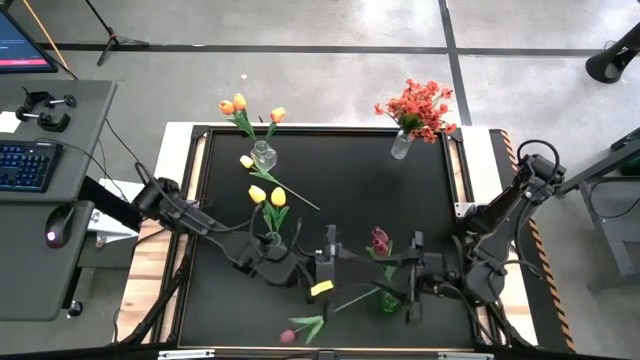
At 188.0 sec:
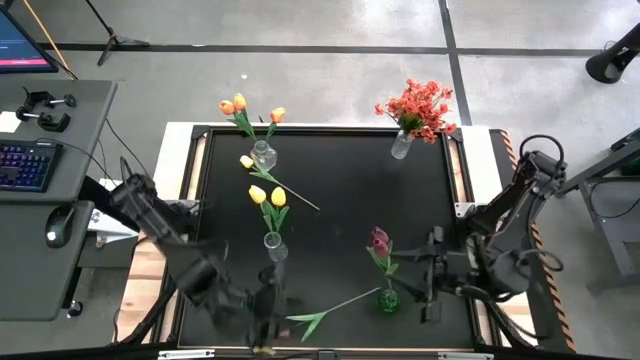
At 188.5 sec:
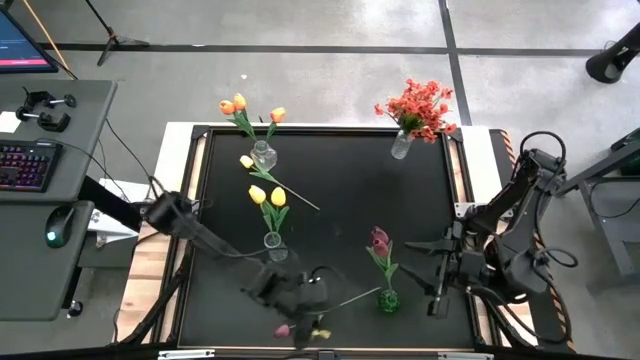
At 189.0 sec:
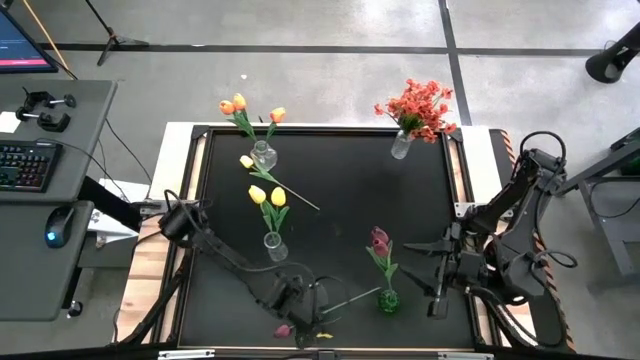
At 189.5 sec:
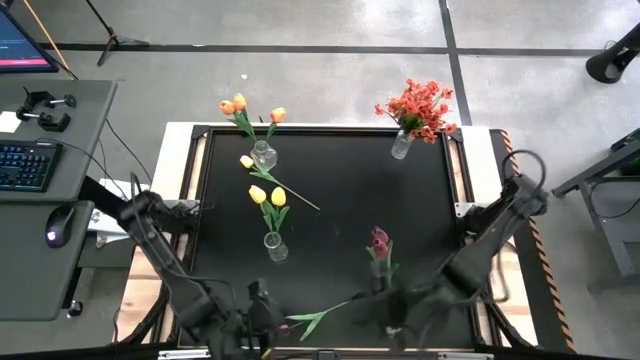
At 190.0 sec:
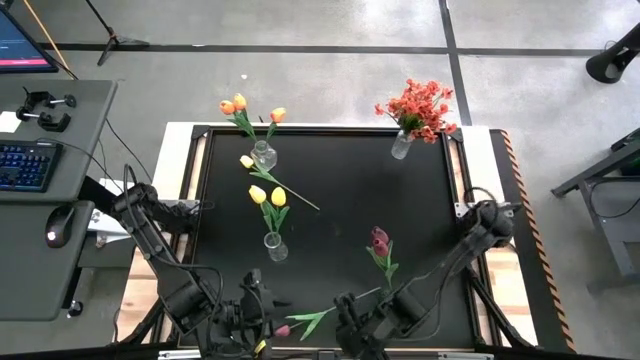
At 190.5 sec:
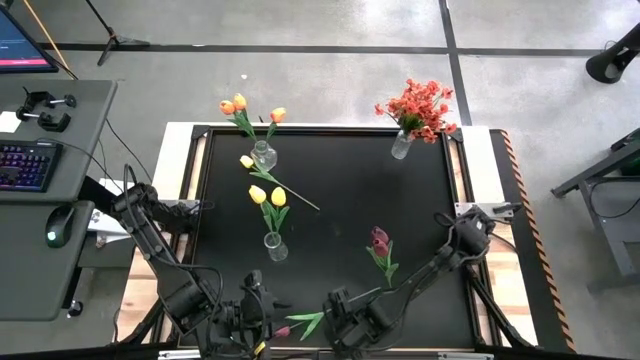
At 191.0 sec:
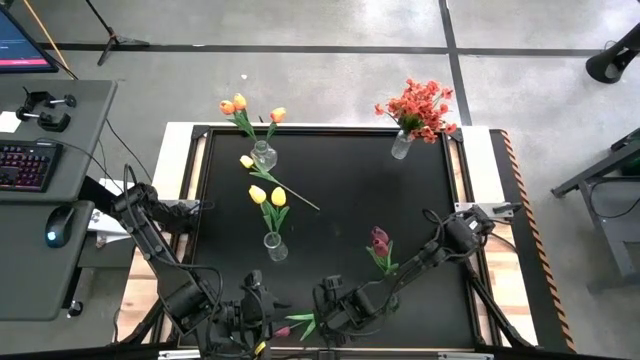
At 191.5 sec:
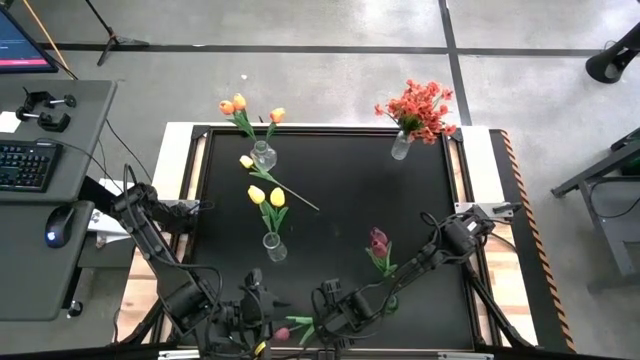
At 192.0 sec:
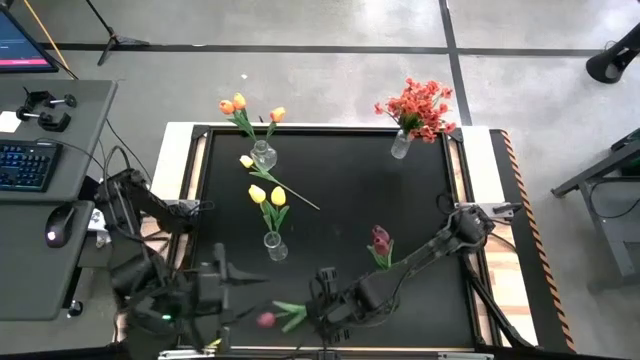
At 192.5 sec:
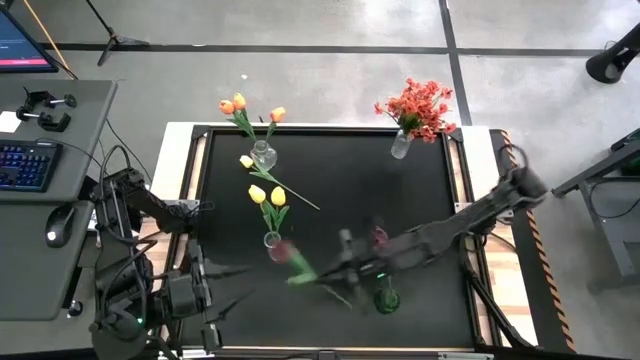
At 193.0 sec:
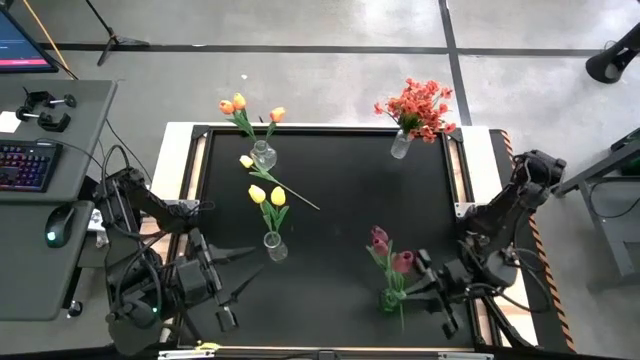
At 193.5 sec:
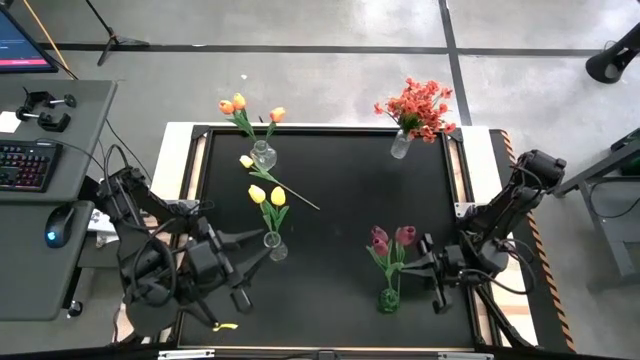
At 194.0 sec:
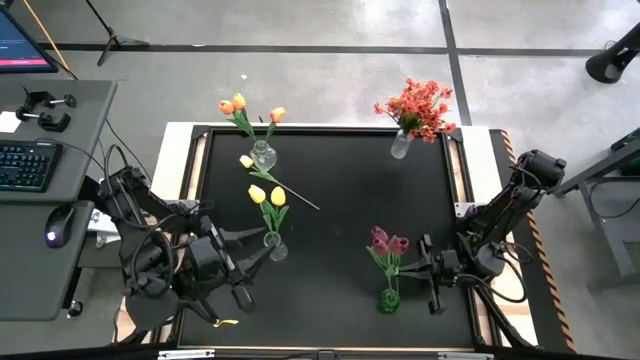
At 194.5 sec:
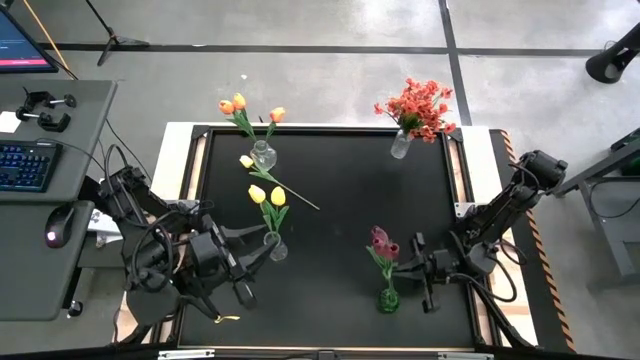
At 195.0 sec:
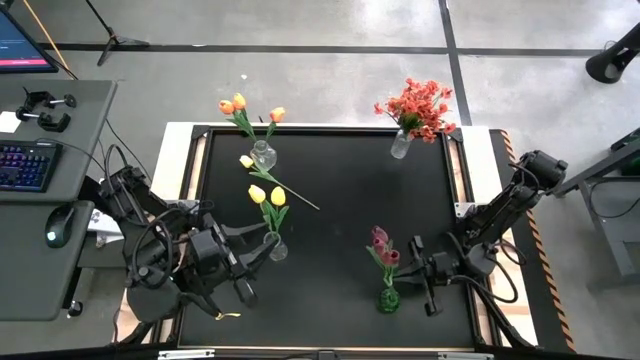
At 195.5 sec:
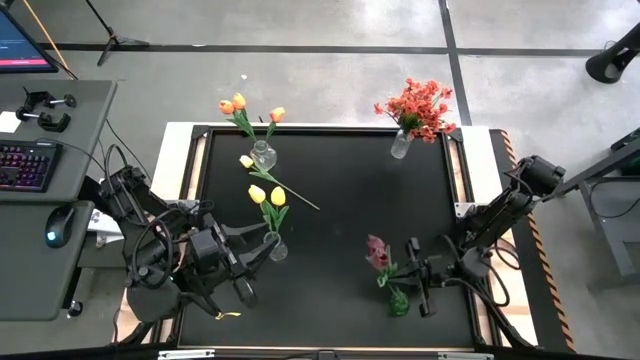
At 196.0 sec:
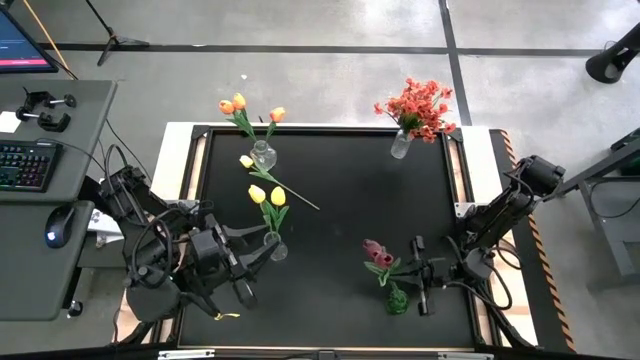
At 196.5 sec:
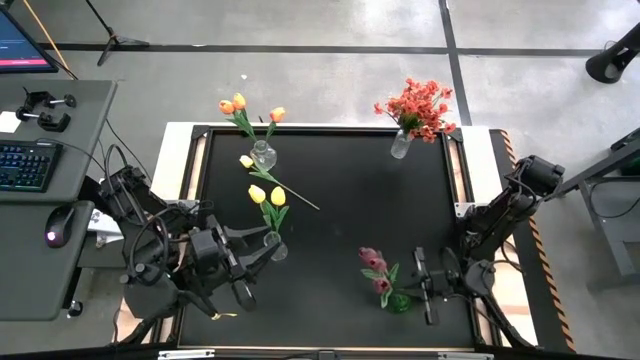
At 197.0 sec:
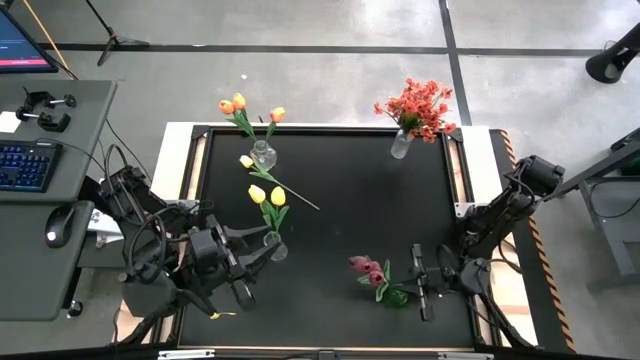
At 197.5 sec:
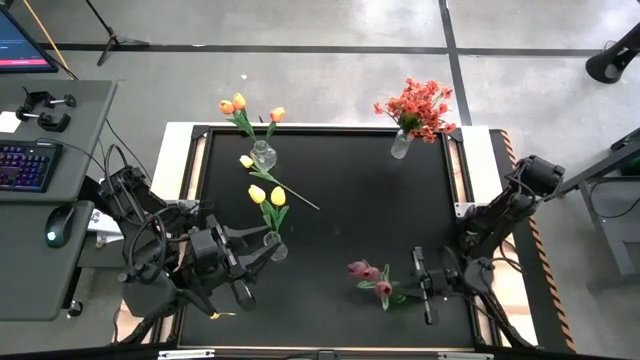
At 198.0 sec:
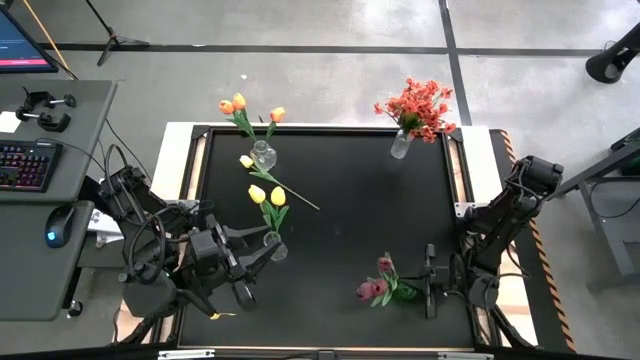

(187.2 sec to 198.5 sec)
Task: Sort flowers into vase by color
Put the dark red flower into the green vase

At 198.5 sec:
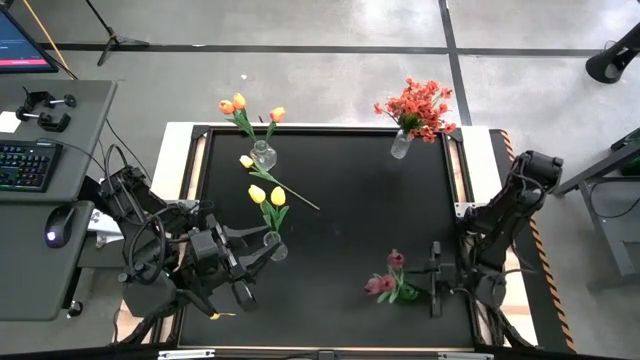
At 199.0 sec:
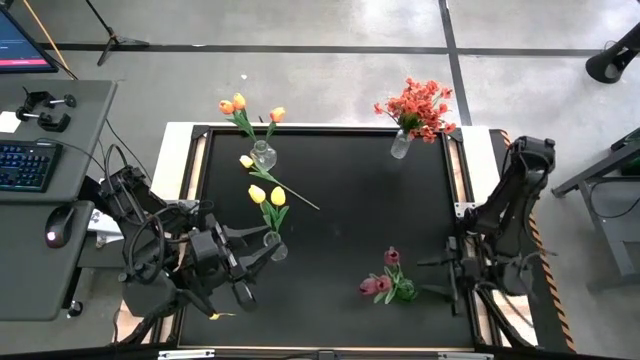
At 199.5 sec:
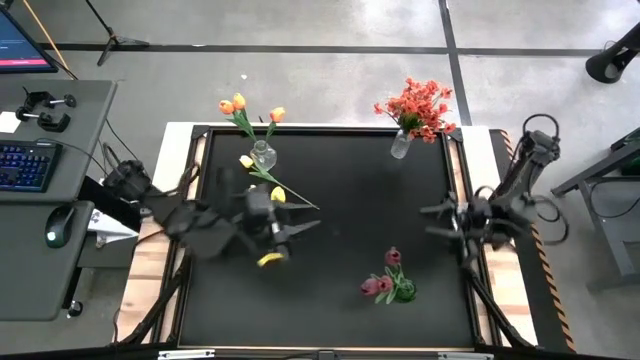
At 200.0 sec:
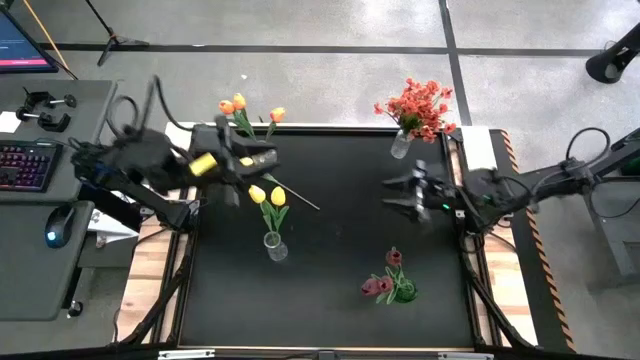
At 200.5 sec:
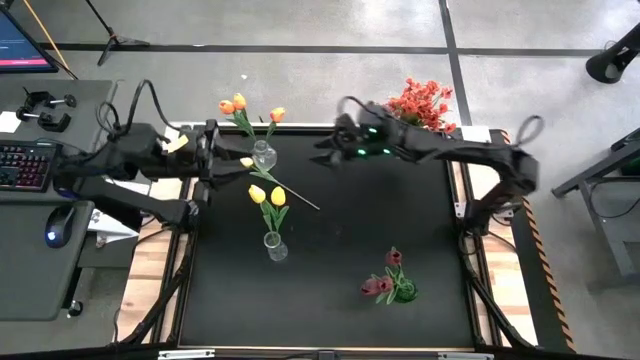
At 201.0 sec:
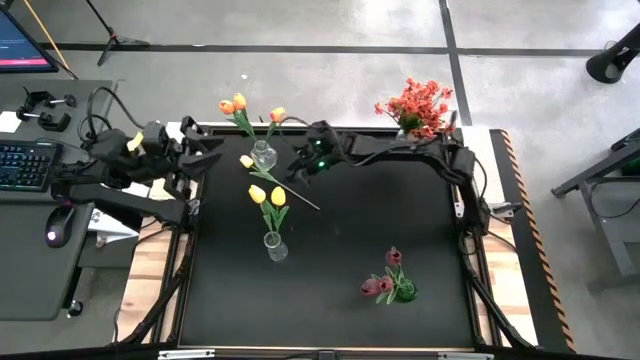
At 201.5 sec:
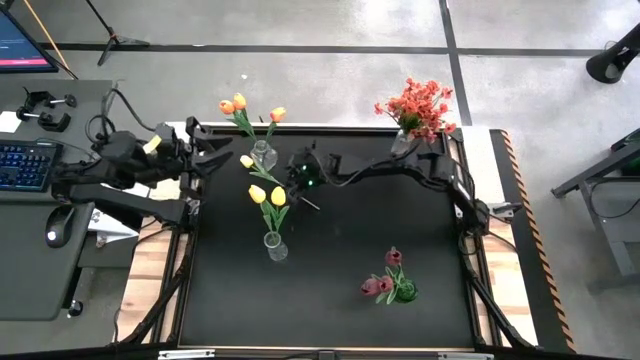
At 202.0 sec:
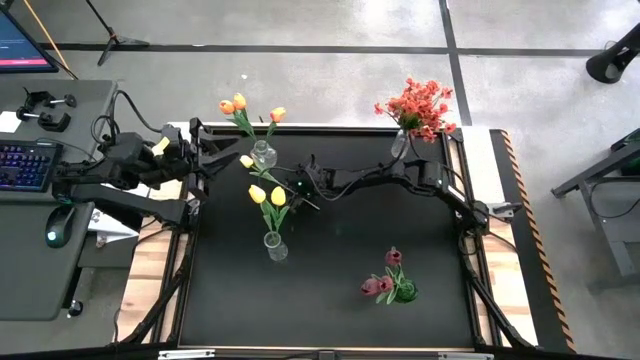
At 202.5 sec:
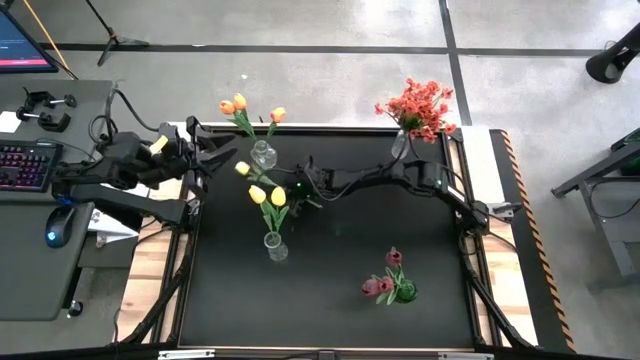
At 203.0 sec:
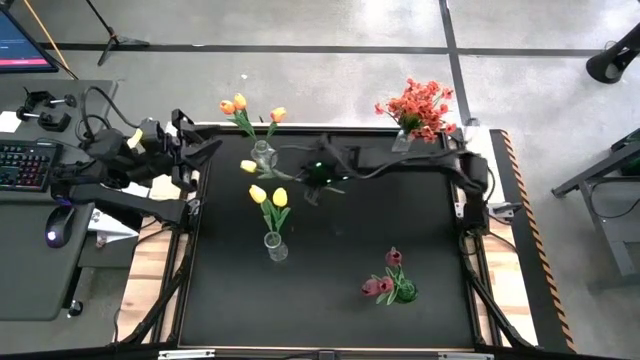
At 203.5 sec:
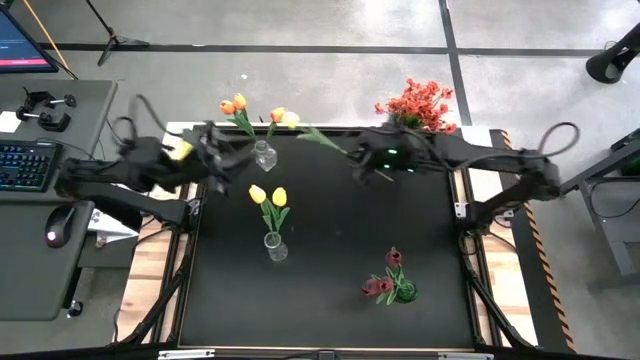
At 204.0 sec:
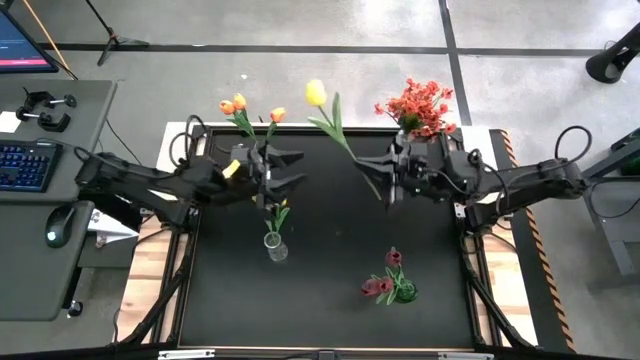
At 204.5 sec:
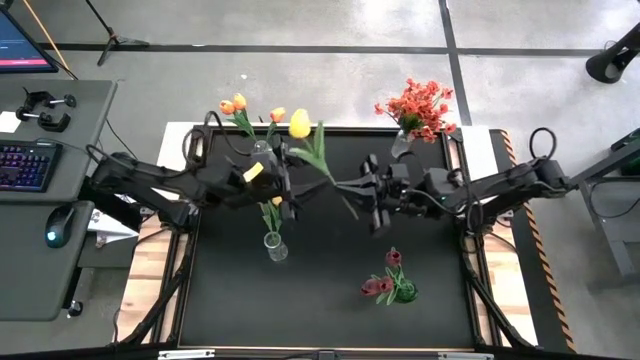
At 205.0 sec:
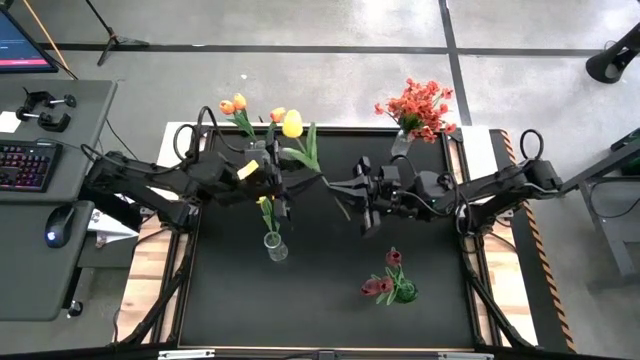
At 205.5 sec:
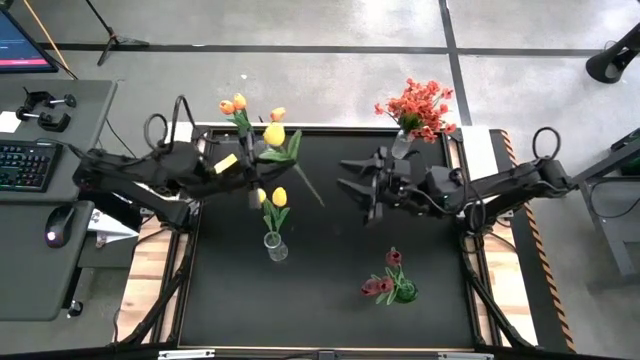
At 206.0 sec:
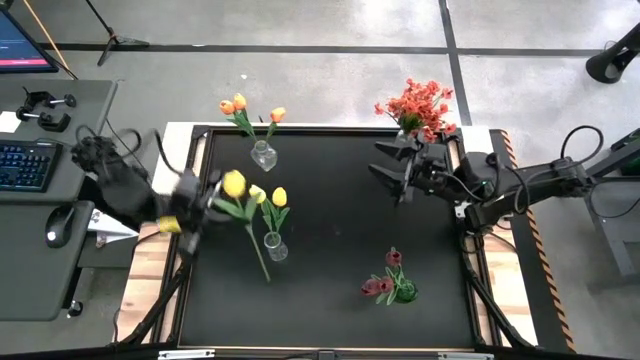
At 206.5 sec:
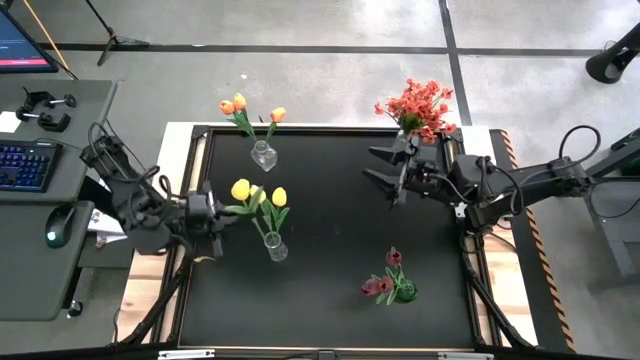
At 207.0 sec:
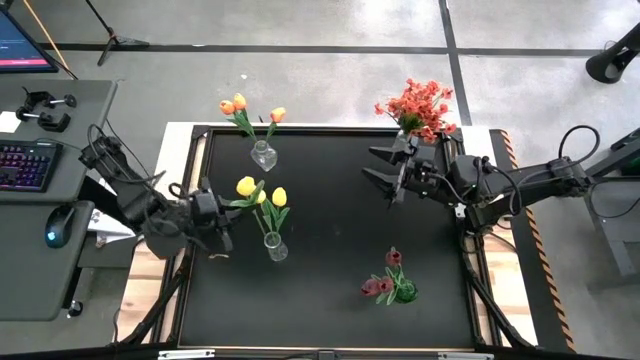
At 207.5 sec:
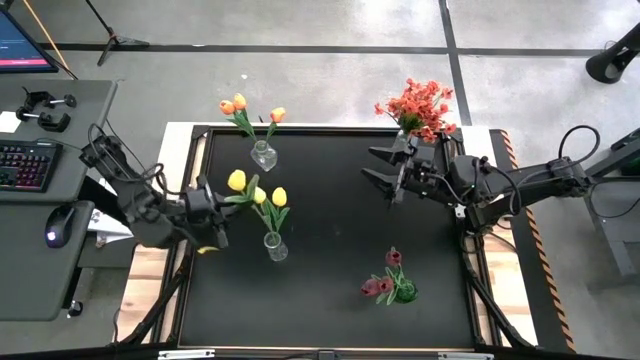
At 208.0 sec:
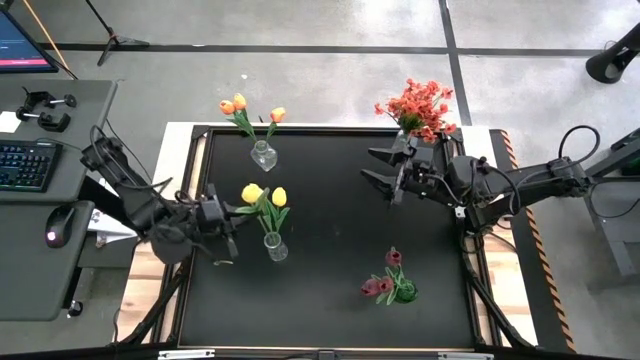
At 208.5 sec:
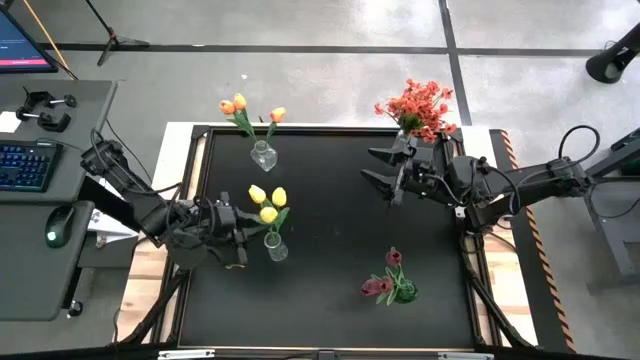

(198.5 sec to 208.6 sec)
Put the yellow flower into the bottom left transparent vase
